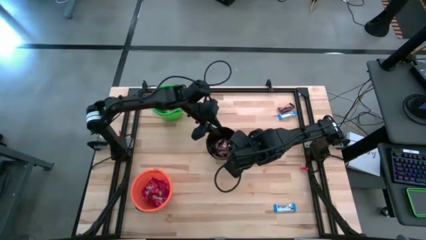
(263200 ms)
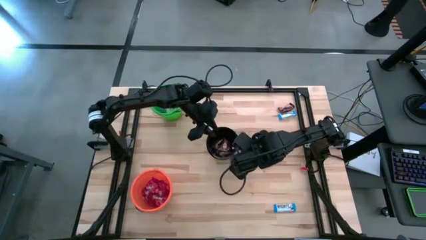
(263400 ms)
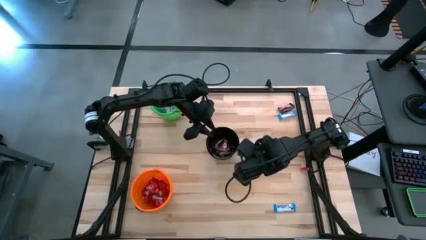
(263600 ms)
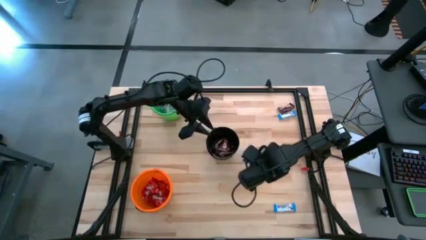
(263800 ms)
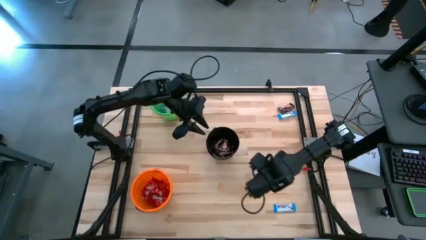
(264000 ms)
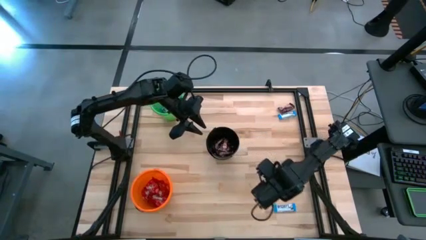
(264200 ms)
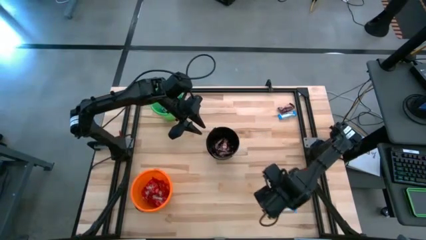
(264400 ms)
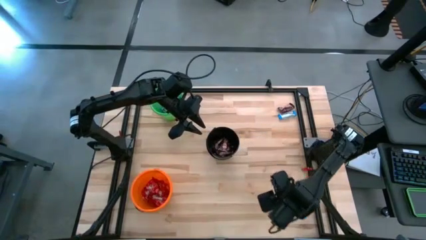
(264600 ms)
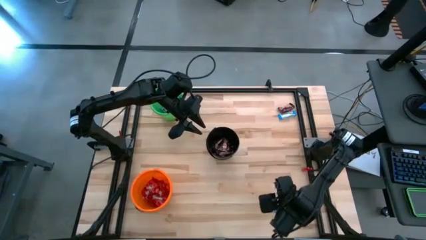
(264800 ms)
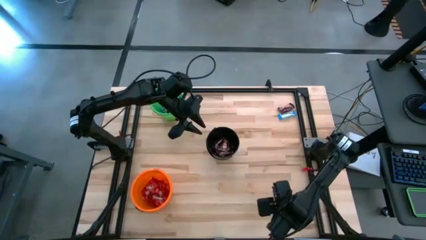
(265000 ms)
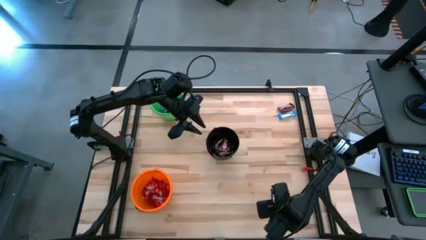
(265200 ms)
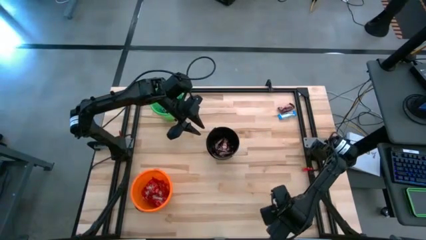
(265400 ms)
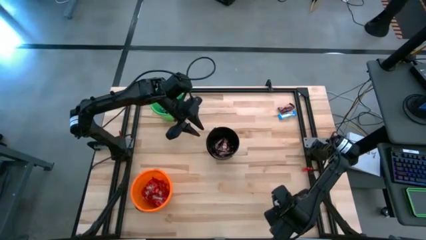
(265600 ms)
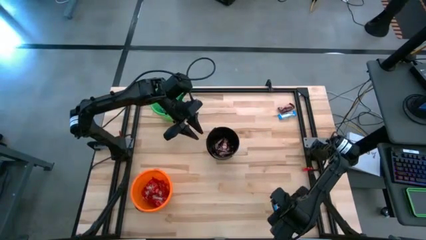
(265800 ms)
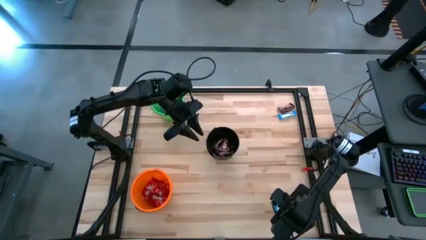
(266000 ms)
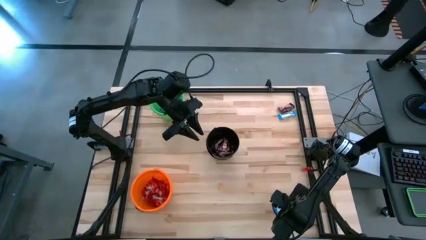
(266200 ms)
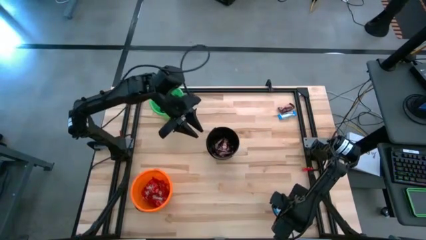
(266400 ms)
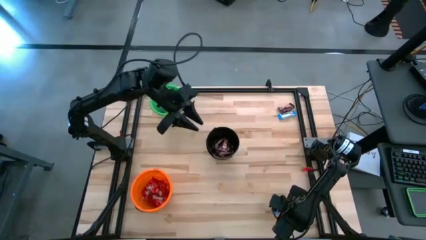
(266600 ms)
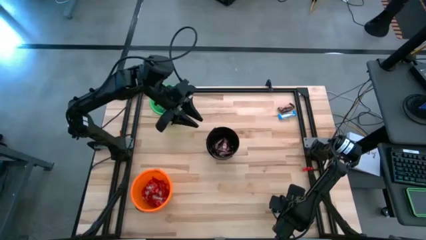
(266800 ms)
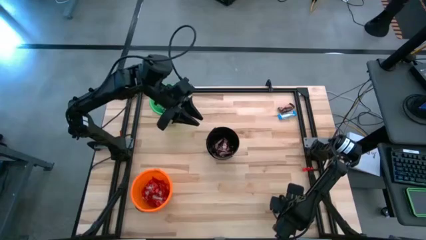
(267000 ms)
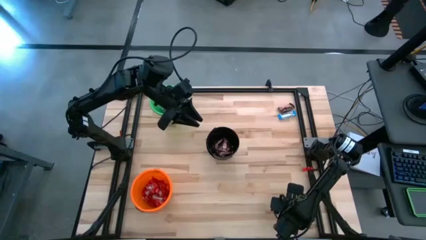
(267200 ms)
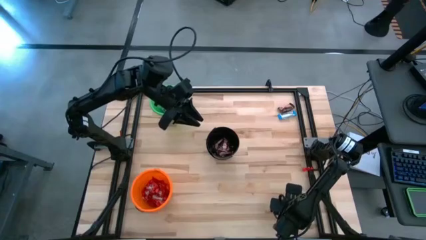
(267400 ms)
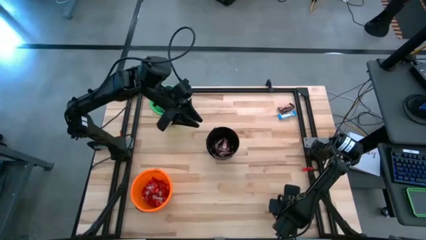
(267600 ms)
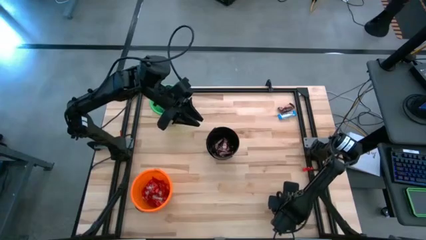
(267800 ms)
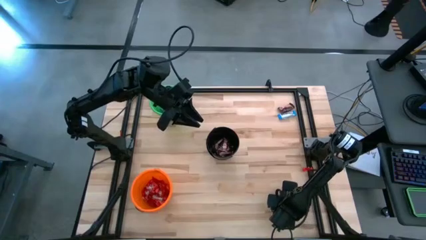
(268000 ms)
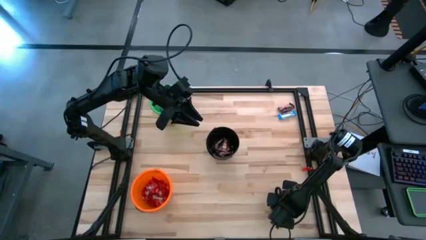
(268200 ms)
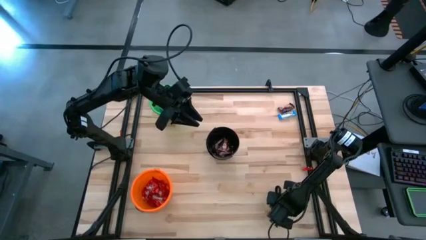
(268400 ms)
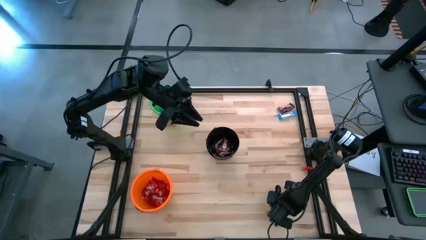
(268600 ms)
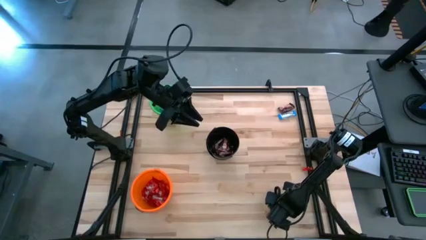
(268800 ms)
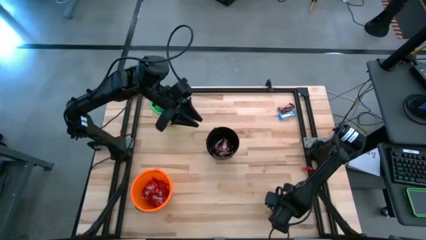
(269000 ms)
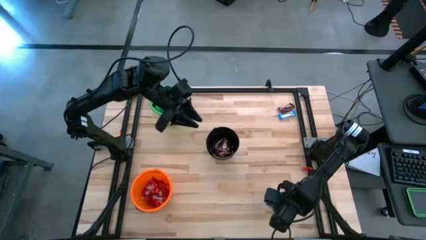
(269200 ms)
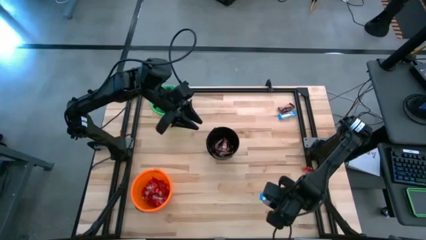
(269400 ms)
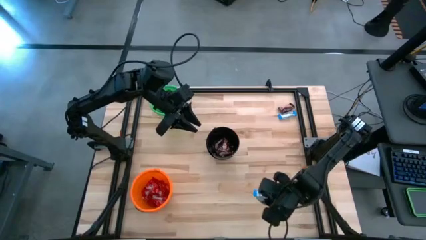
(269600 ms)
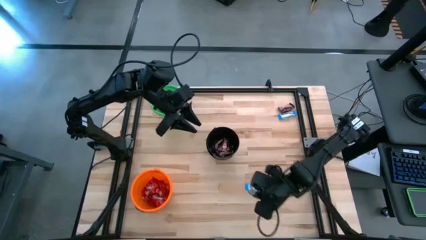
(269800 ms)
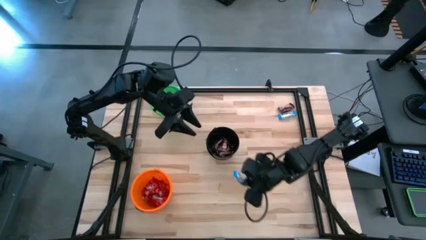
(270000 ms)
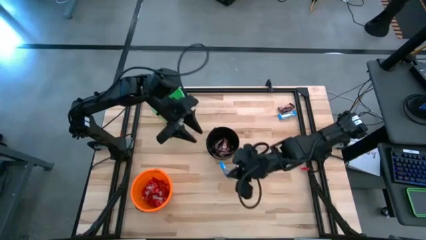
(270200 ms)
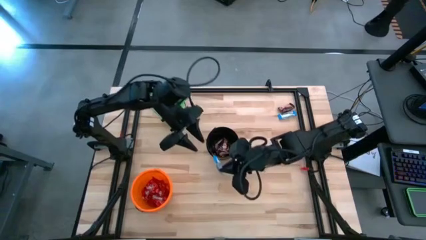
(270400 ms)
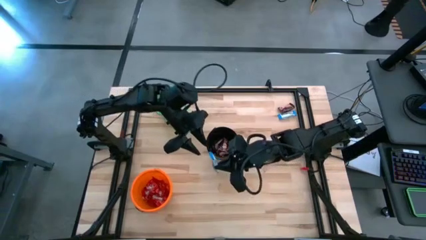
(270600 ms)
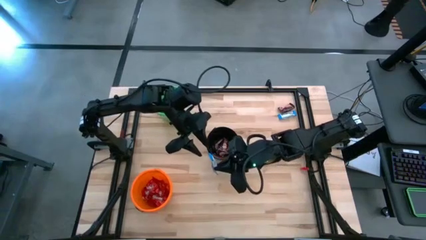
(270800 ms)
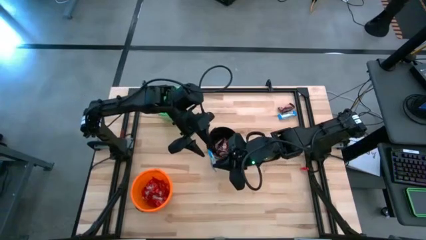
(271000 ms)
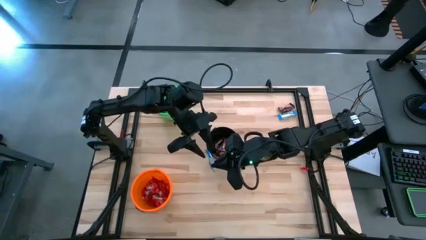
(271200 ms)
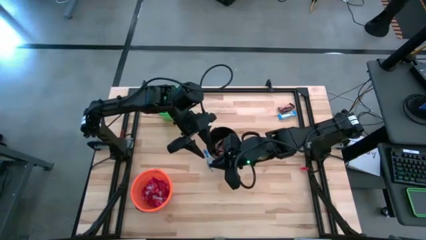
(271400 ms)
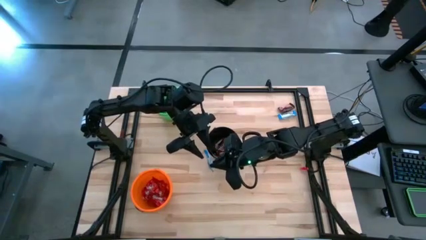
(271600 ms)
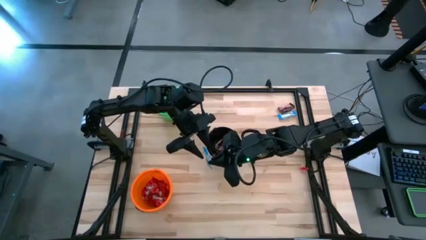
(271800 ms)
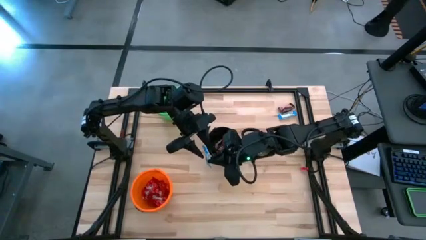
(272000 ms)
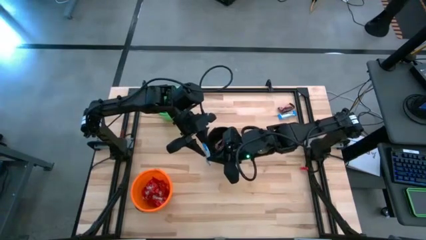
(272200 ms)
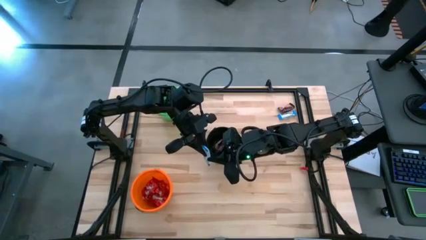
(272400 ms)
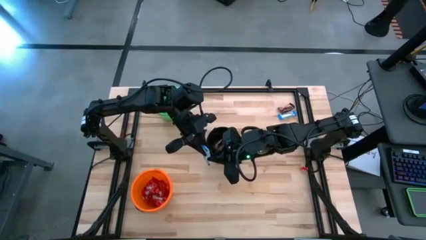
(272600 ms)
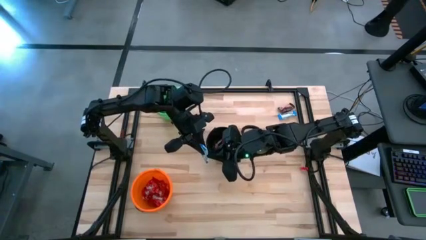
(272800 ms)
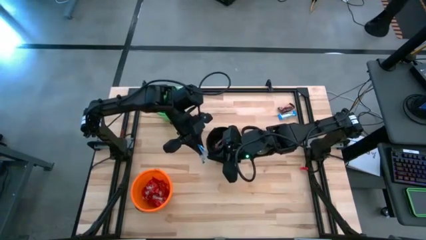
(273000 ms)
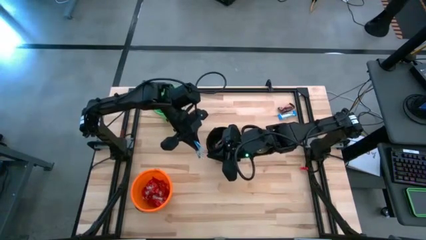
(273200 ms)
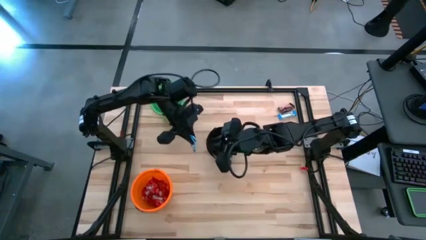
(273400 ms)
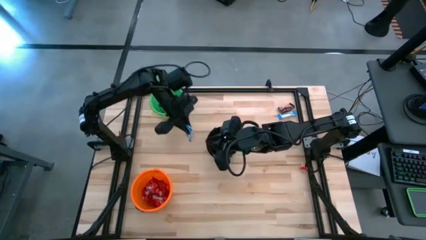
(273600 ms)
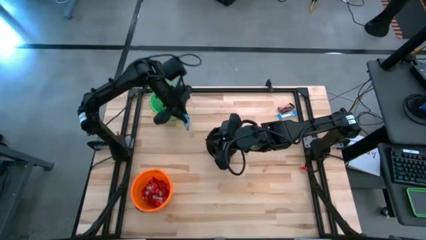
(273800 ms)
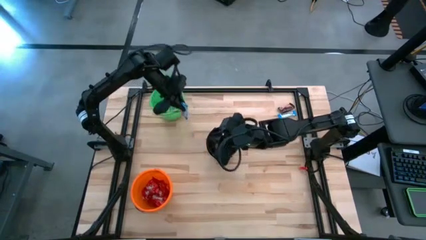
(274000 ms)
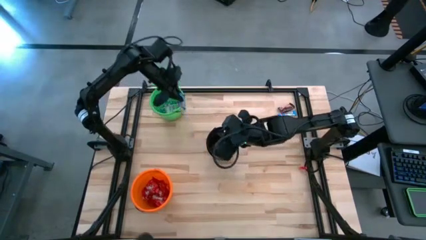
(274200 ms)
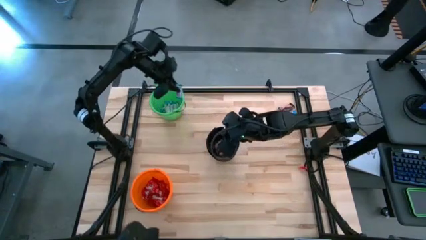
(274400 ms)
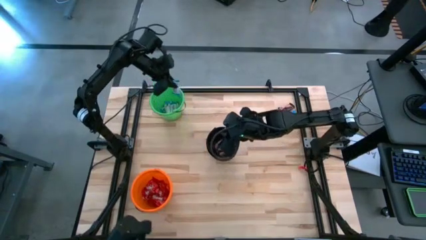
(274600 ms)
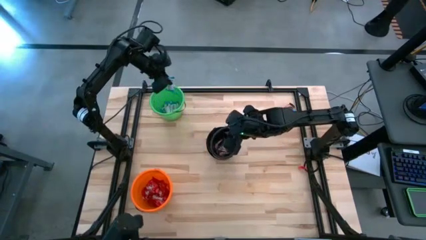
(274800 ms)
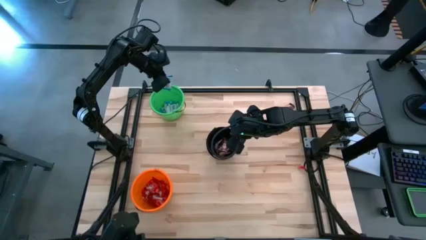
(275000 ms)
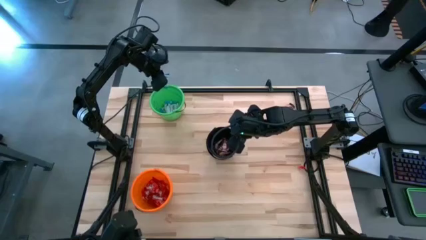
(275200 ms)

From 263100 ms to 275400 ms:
Task: Sort candy
Put the bottom white chocolate into the green bucket

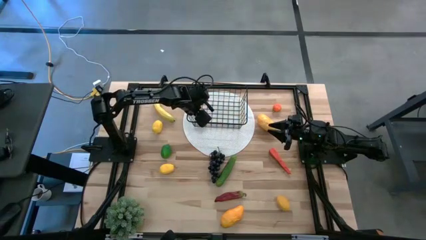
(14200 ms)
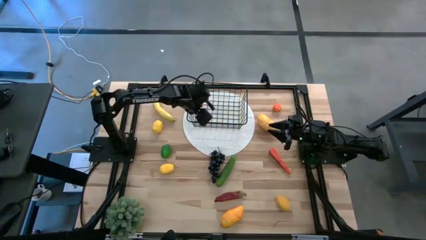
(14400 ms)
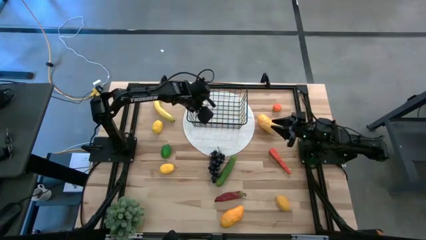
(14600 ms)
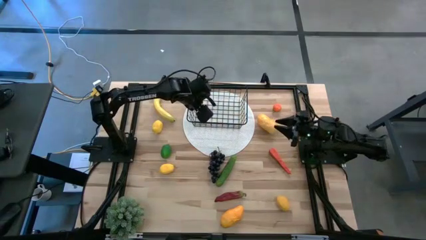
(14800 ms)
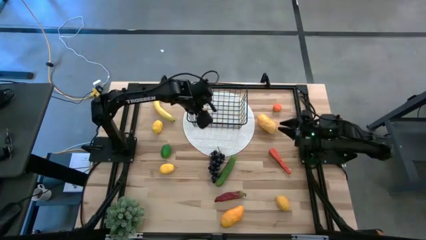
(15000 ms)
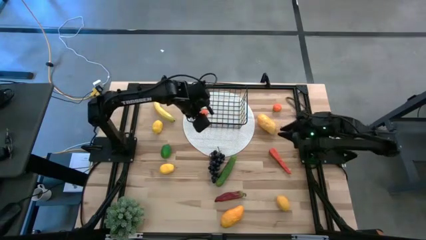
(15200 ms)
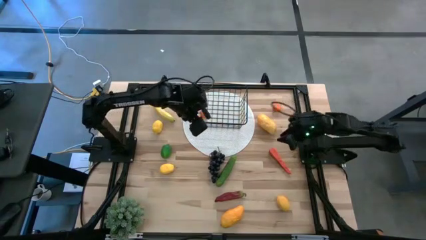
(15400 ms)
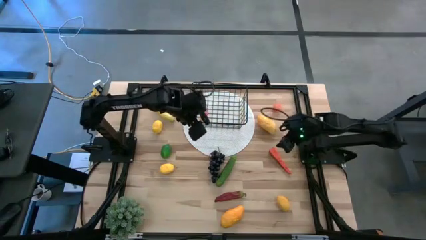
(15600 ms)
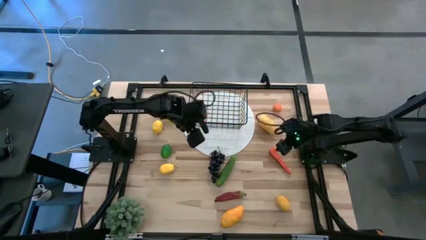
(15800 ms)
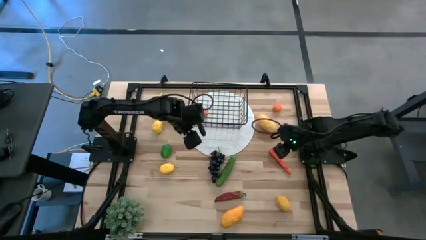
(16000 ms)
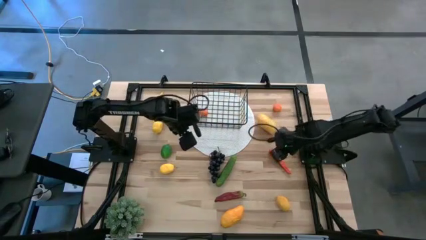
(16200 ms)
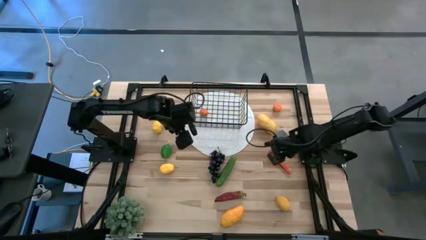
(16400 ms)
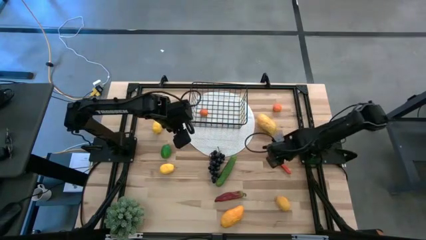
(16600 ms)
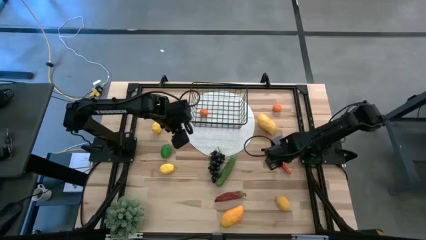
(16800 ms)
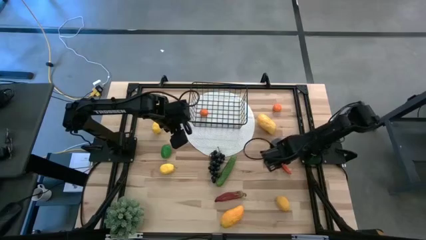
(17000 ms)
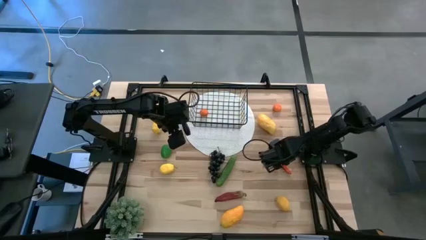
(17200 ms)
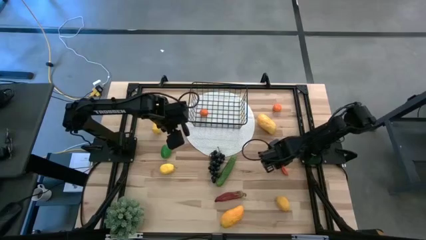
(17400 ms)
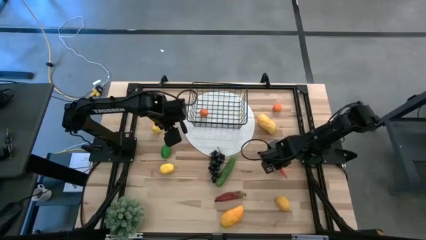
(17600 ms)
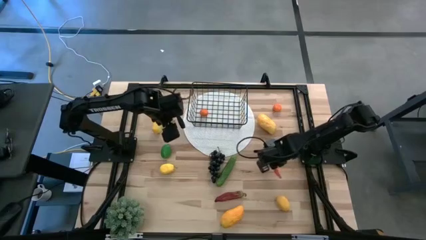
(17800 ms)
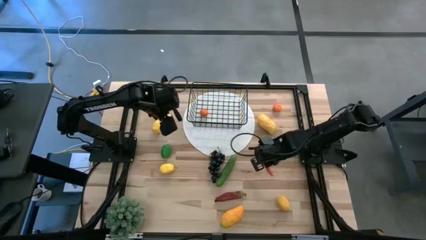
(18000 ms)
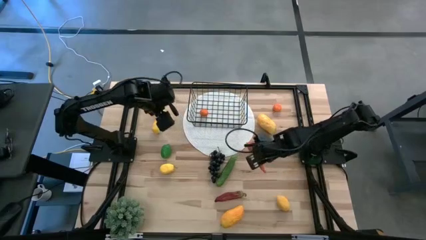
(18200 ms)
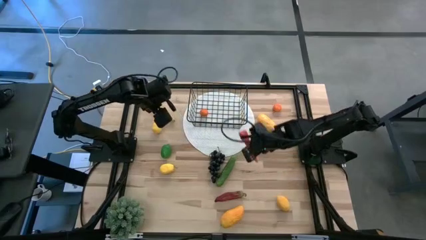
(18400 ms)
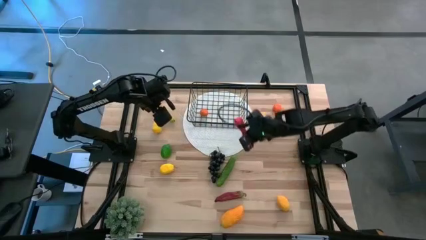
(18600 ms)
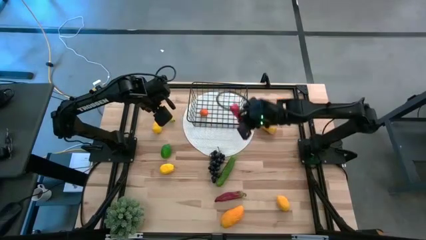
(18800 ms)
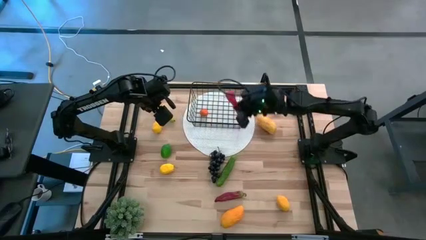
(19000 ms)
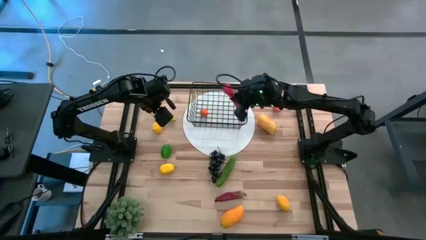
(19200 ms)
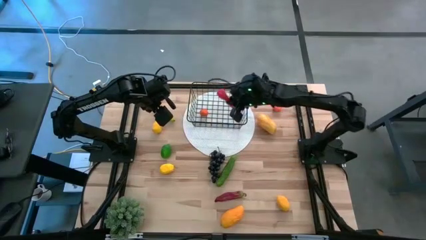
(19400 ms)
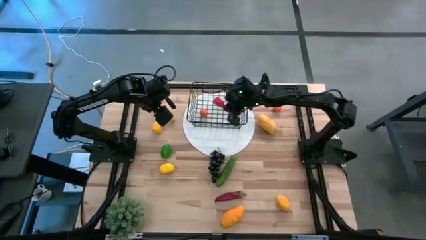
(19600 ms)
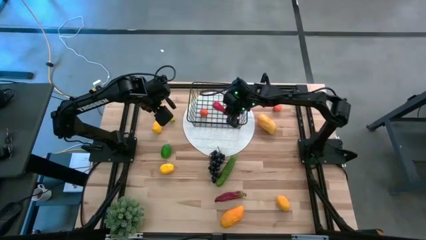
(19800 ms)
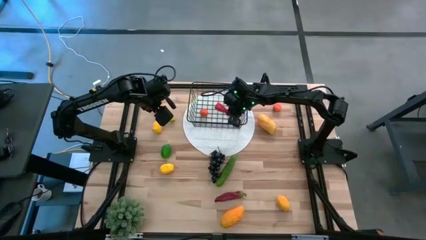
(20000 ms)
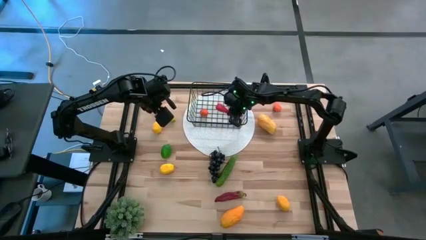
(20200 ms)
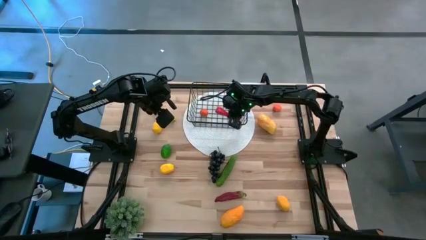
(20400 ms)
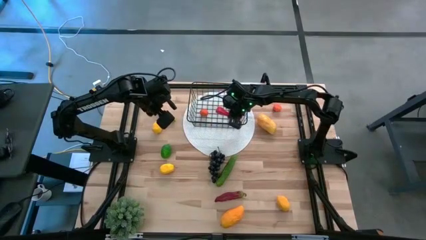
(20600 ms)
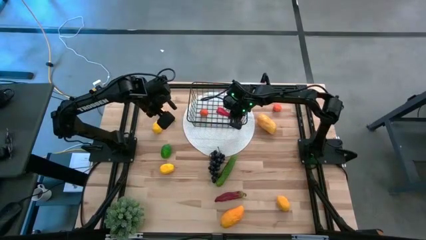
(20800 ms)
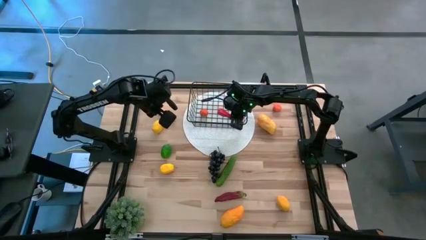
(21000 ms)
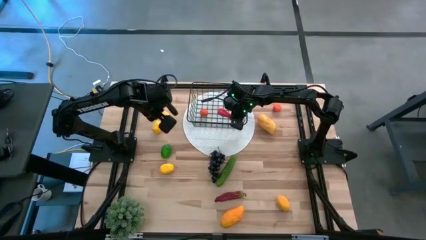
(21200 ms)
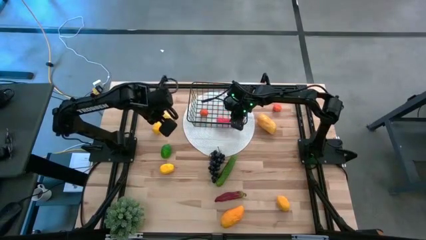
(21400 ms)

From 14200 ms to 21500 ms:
Task: Build produce basket
Put the orange carrot into the black wire basket
